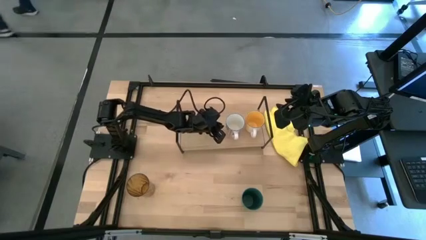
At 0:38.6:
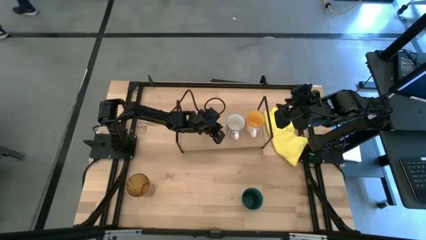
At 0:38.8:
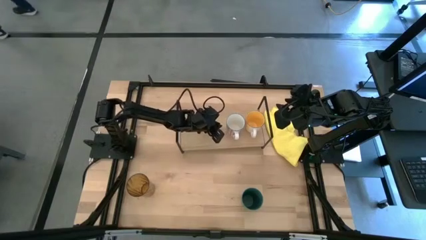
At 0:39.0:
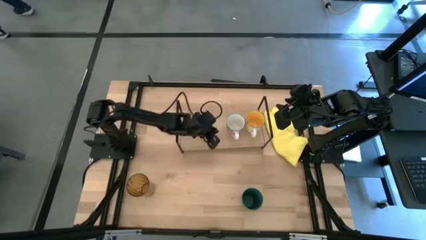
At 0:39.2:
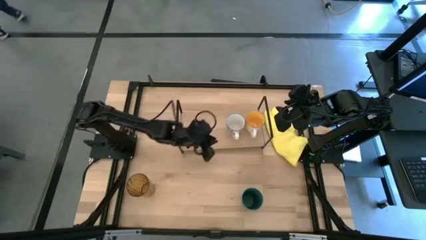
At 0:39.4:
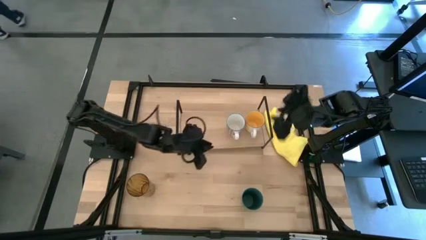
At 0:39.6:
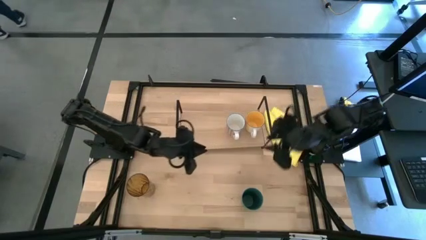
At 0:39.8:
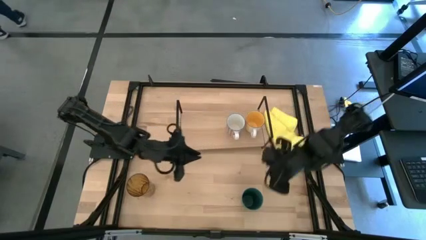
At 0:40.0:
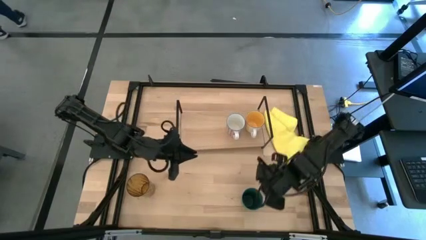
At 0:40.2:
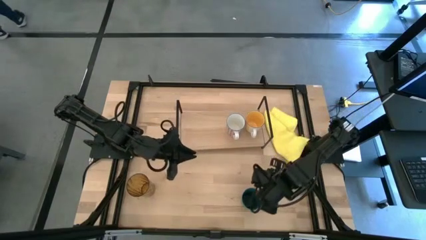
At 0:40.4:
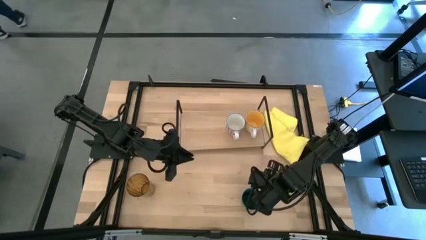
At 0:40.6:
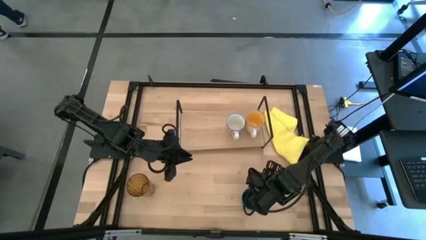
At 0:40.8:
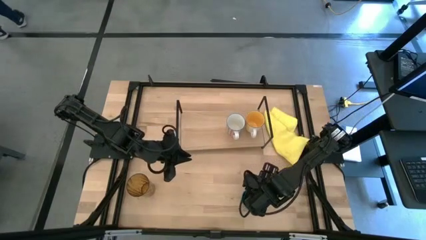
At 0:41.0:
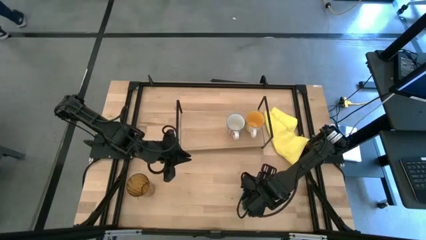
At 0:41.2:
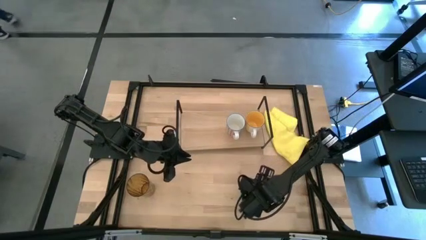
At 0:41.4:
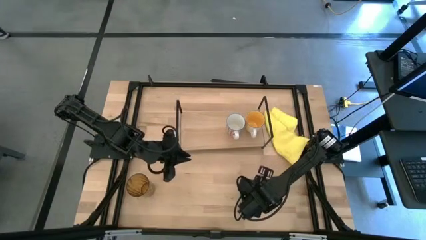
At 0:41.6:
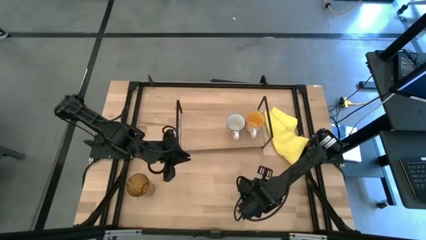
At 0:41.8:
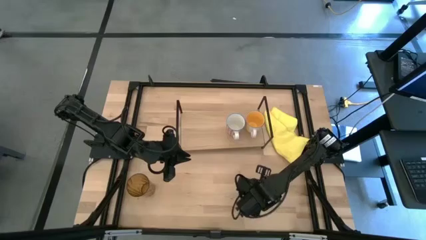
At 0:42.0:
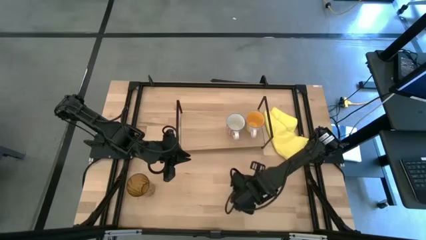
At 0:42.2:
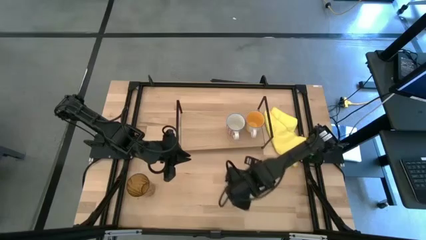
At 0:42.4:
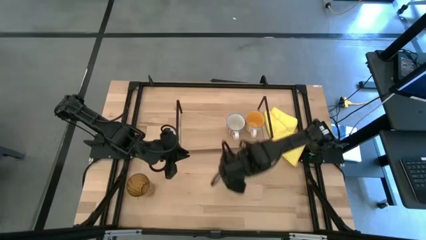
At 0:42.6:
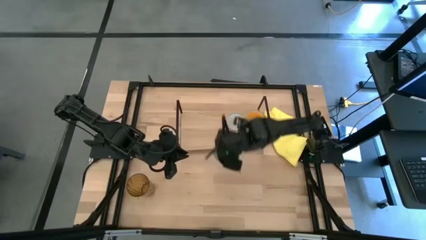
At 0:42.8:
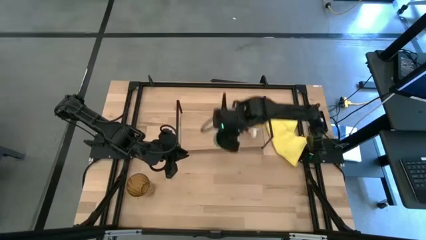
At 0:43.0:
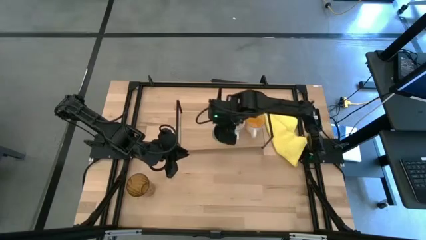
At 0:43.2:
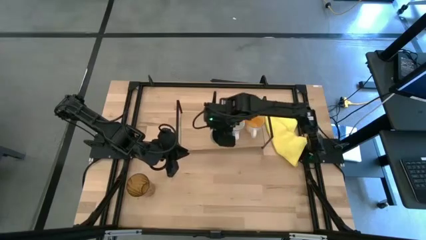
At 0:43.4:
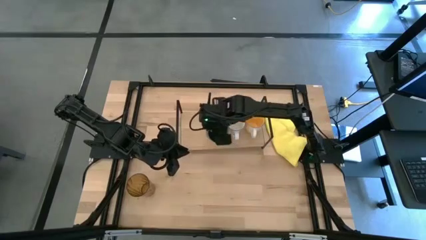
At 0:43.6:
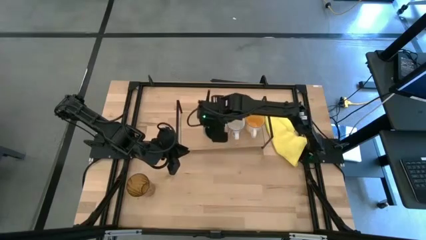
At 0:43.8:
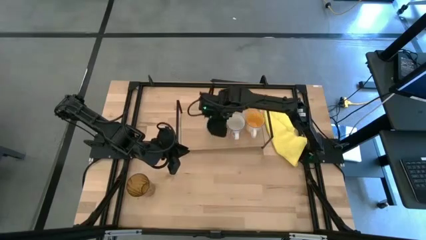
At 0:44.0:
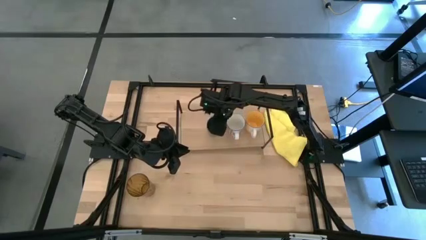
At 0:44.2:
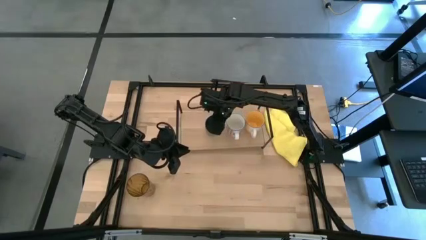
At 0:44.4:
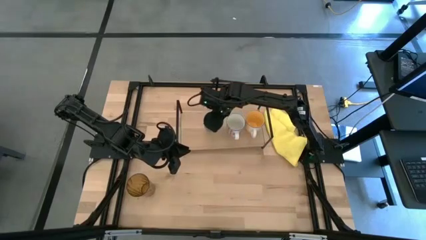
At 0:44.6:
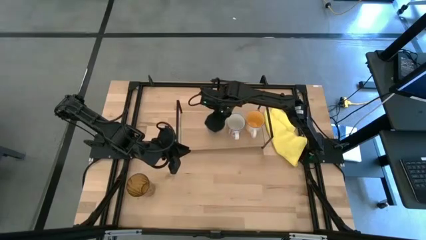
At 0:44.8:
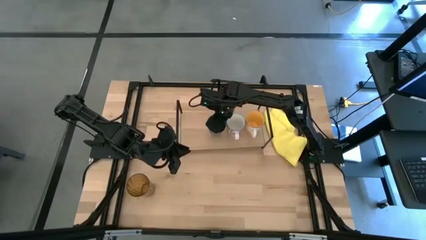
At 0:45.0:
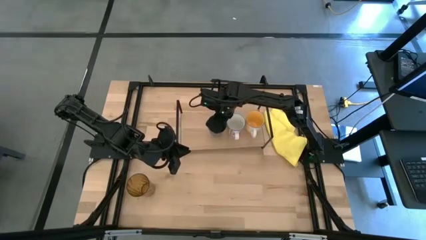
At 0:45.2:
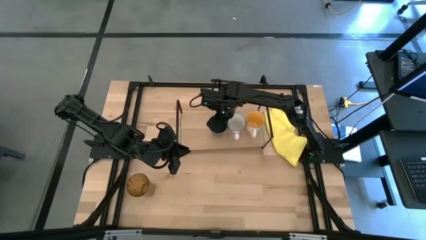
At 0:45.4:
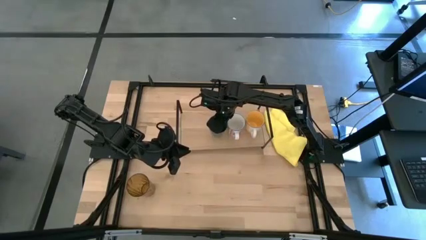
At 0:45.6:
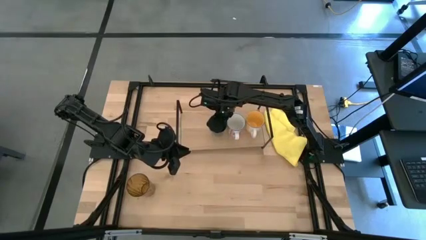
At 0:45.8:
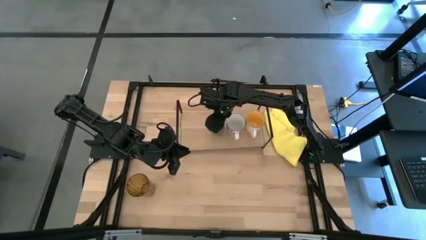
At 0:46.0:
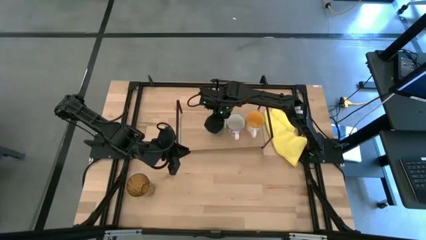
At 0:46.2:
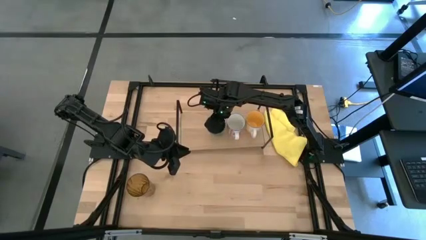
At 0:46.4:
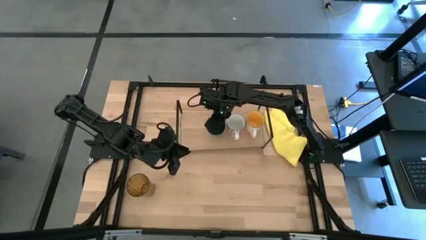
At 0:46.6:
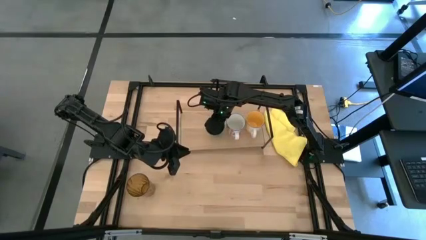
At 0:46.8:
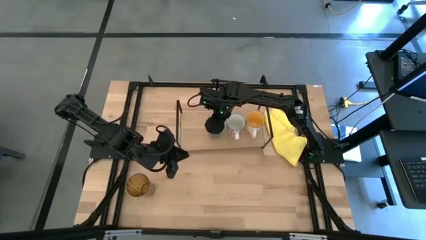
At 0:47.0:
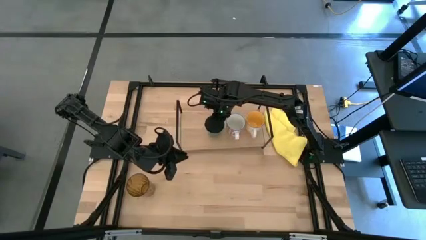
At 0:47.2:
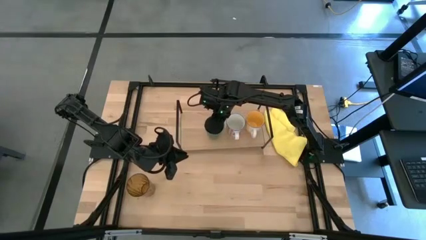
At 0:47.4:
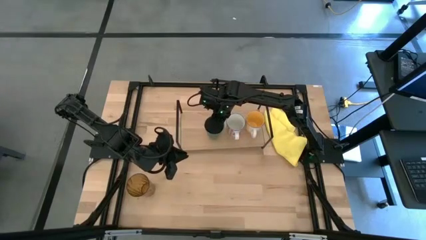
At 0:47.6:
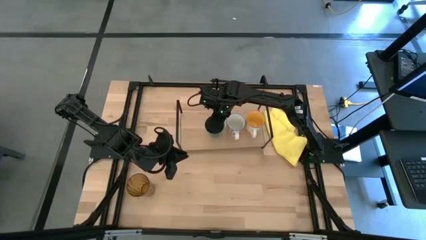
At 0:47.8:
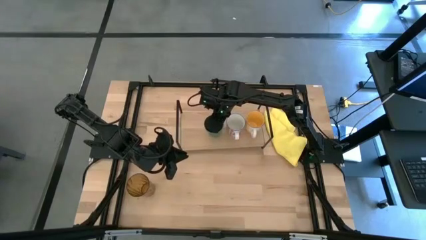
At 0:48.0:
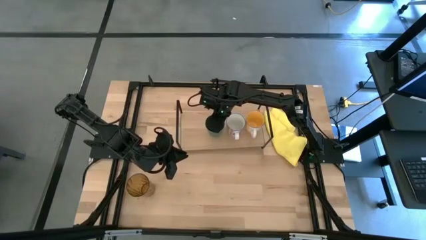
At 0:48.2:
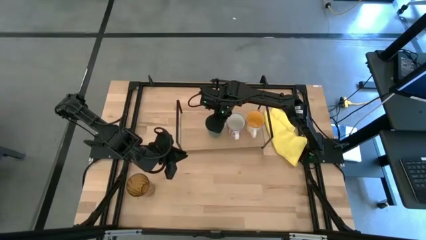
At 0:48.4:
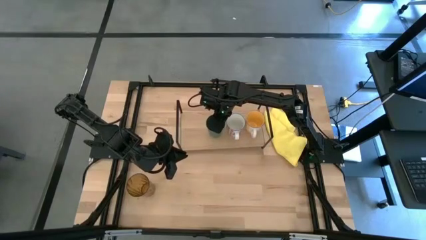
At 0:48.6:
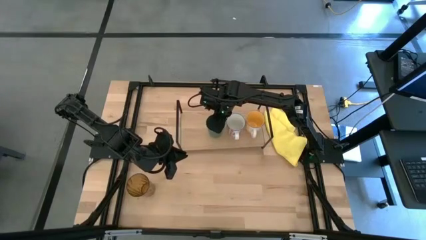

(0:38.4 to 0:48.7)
Task: Stack small to large cups/mugs on shelf
Put the green cup on the shelf
